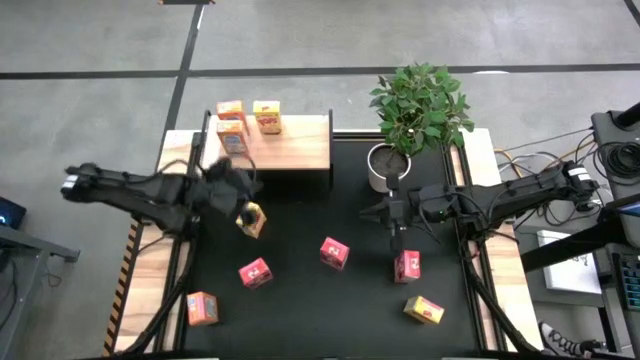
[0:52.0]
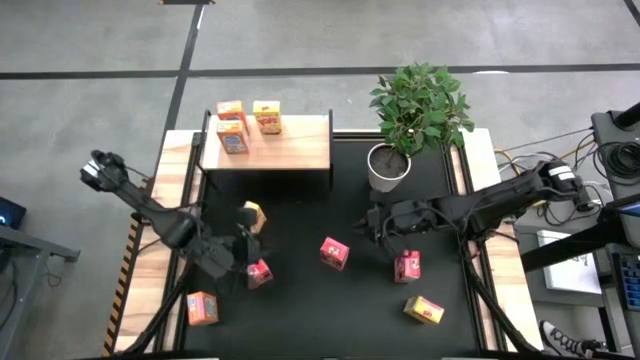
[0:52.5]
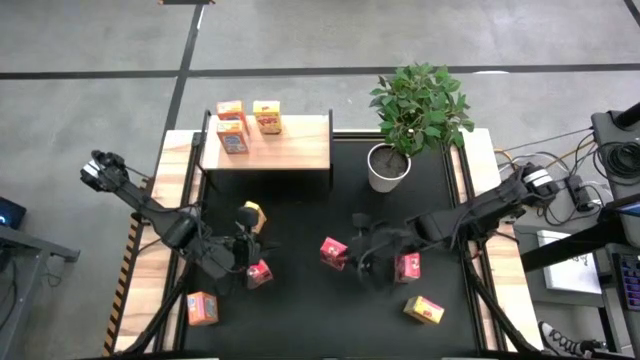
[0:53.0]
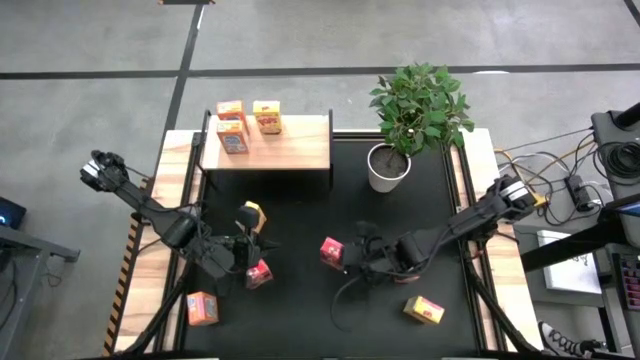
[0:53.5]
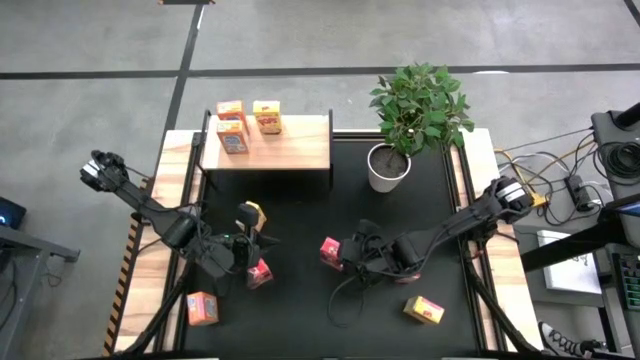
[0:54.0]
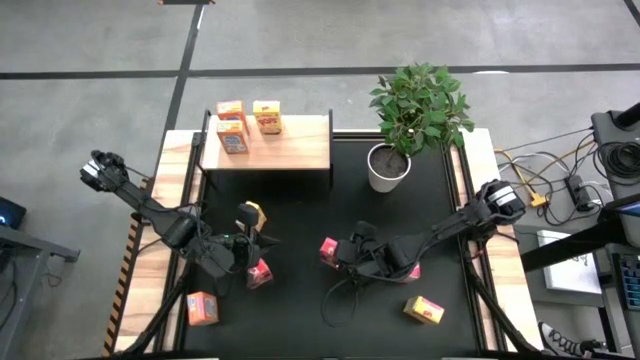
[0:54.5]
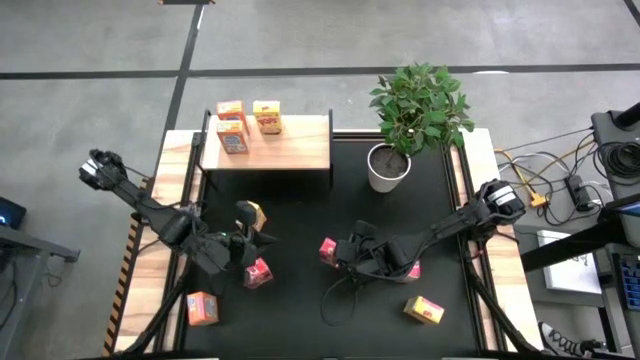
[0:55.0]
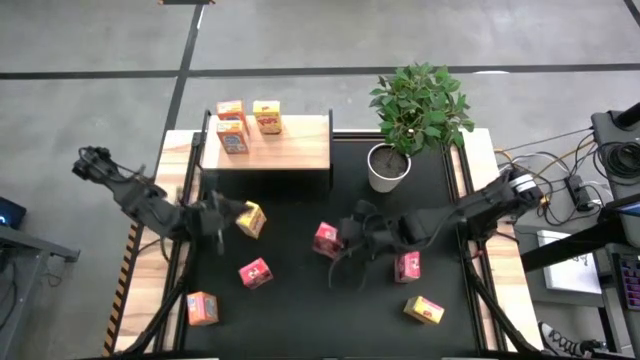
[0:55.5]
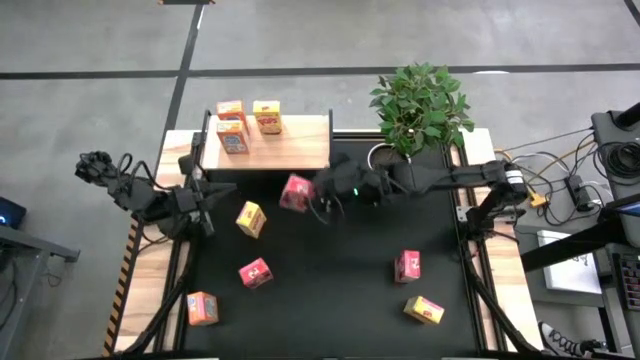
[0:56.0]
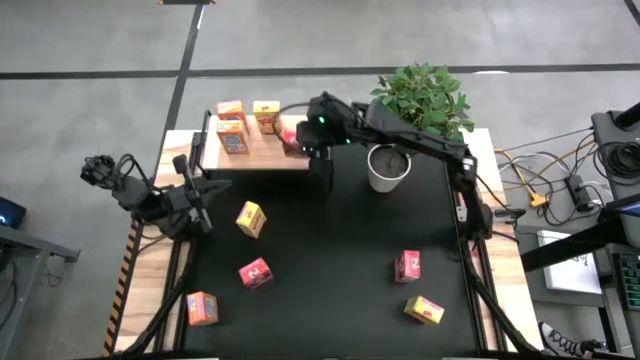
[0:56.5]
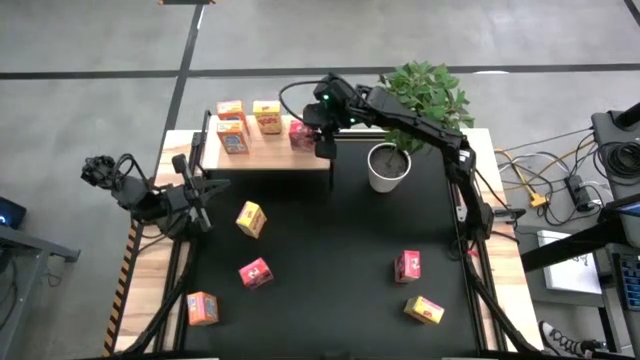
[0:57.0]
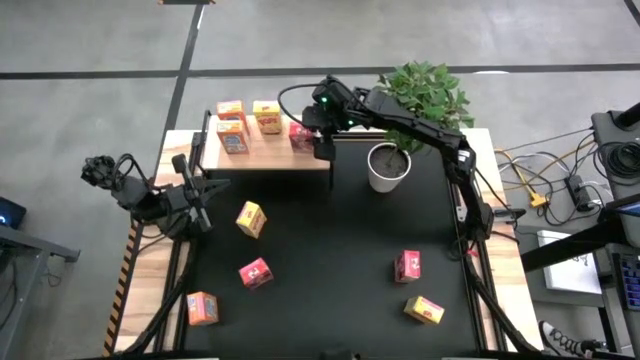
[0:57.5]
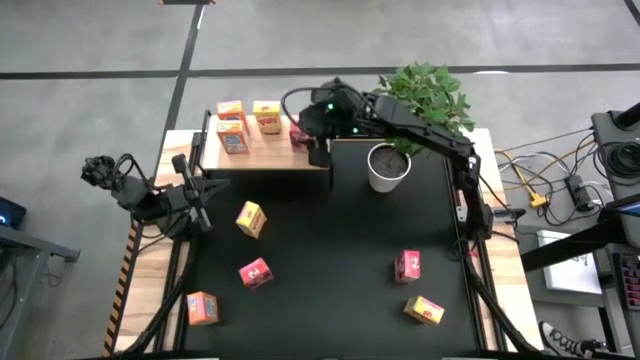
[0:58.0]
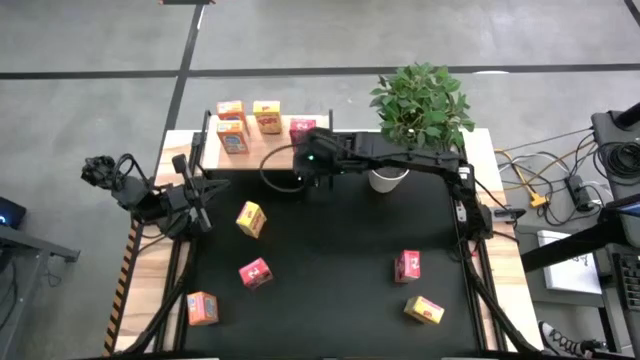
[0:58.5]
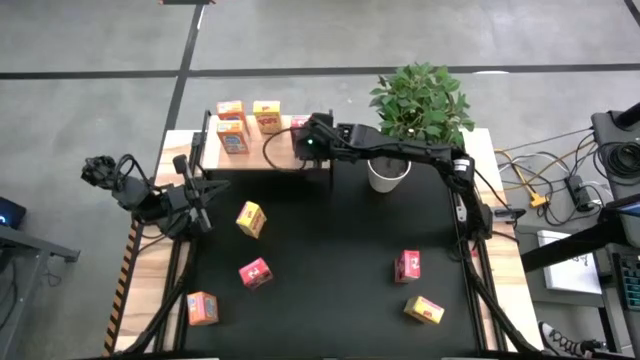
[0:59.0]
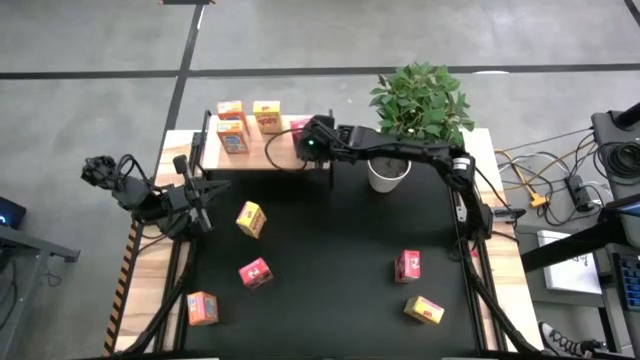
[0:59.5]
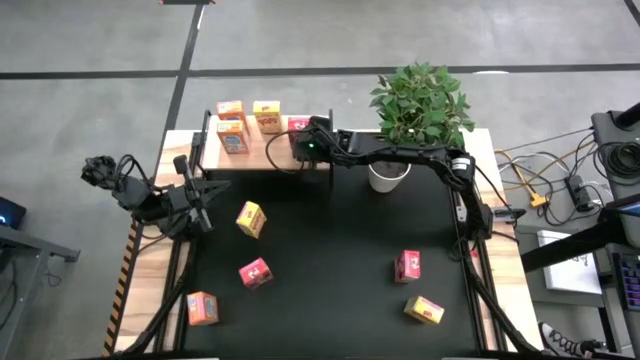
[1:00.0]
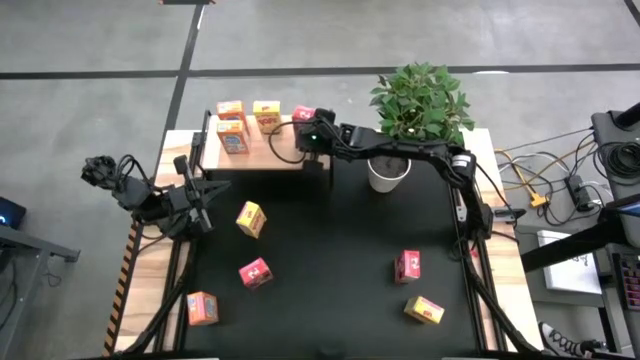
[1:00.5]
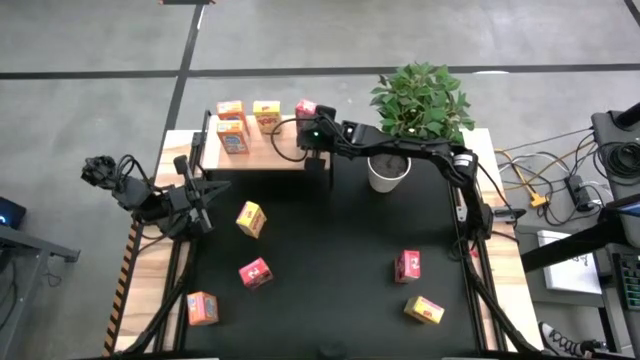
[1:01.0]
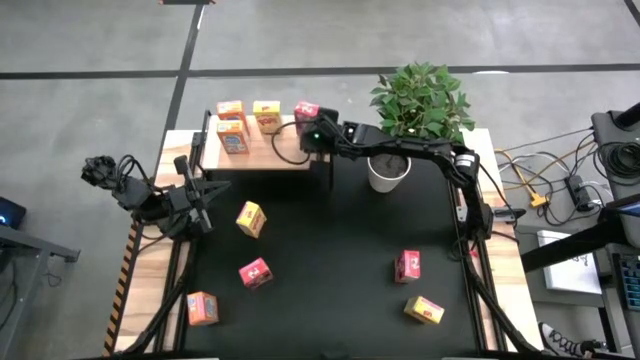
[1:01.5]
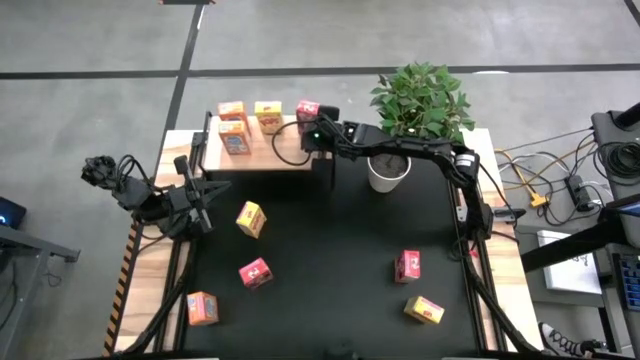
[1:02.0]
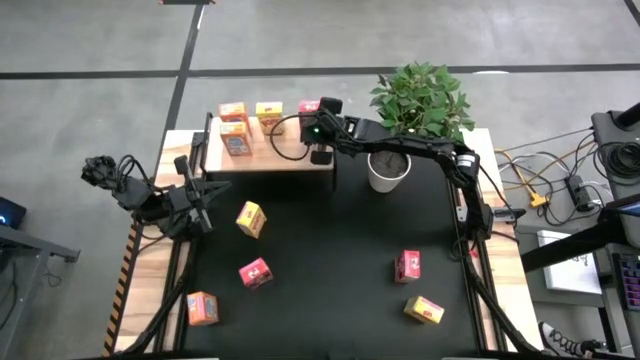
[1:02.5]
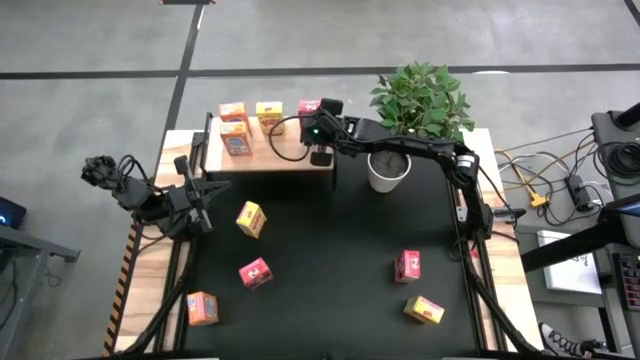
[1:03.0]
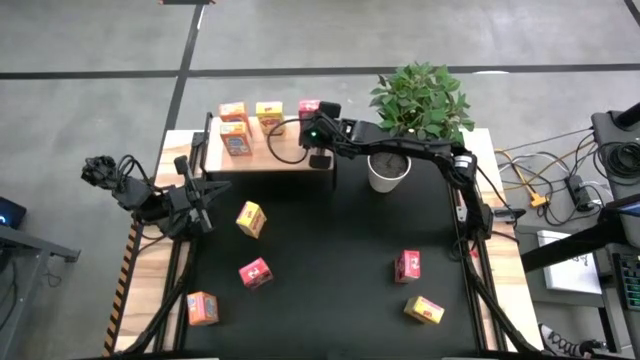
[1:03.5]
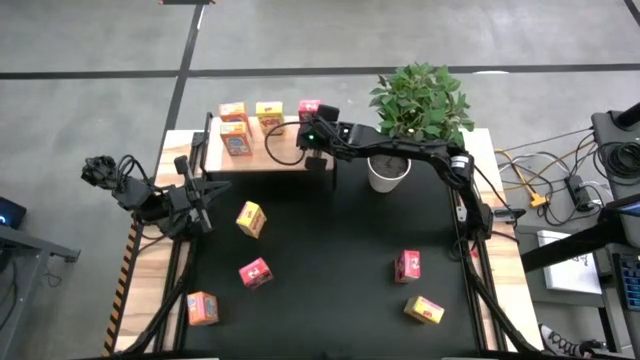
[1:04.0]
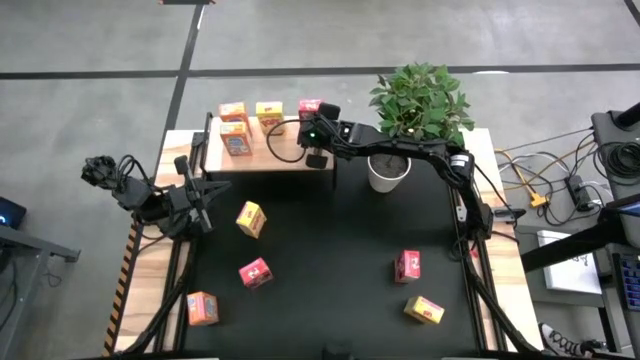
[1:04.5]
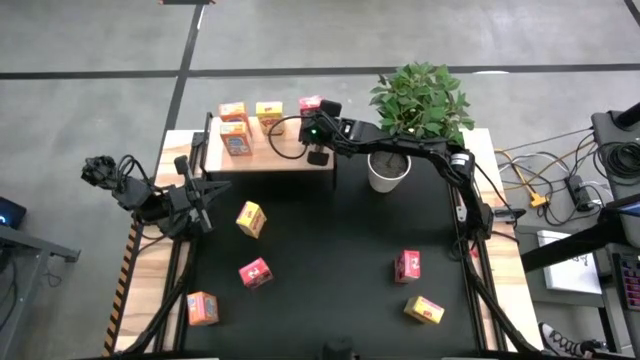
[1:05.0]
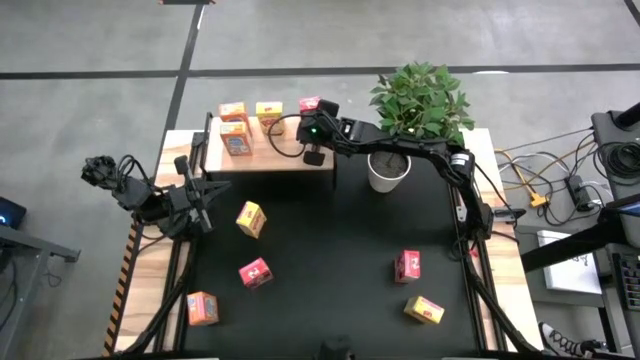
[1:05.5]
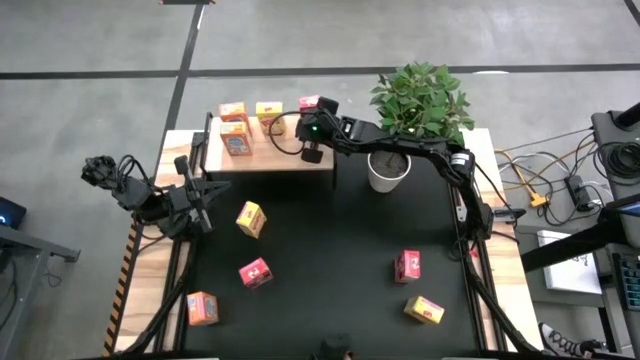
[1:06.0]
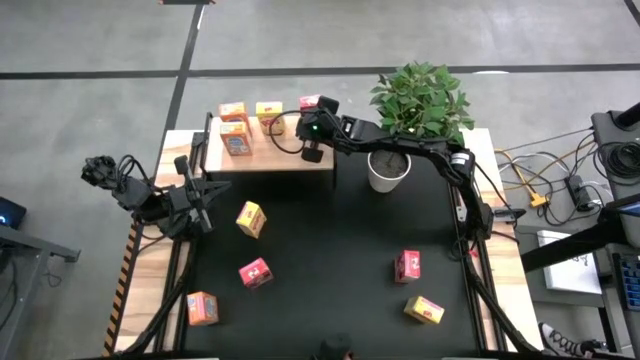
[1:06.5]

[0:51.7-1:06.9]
Task: Stack cereal on shelf
Put the center red cereal box on the shelf

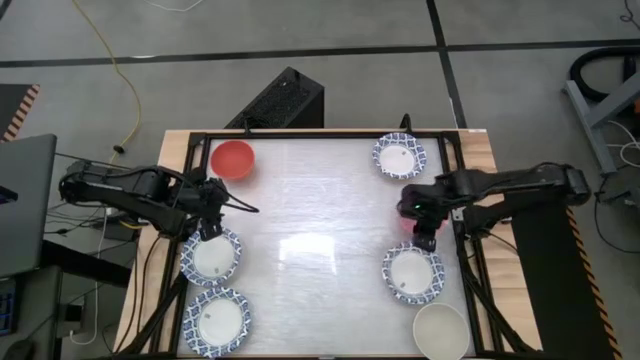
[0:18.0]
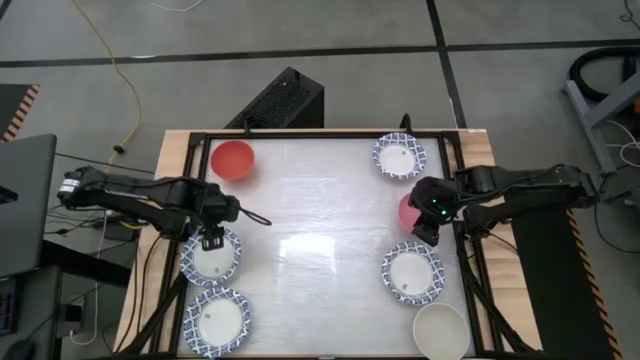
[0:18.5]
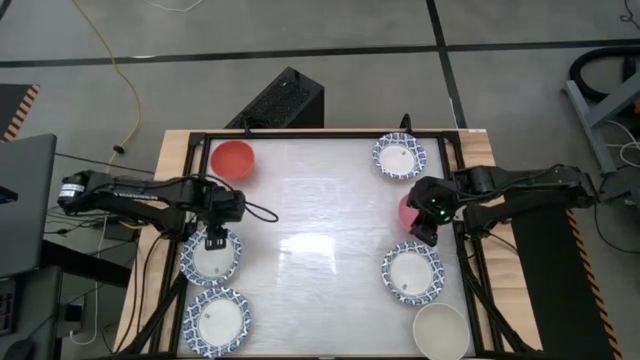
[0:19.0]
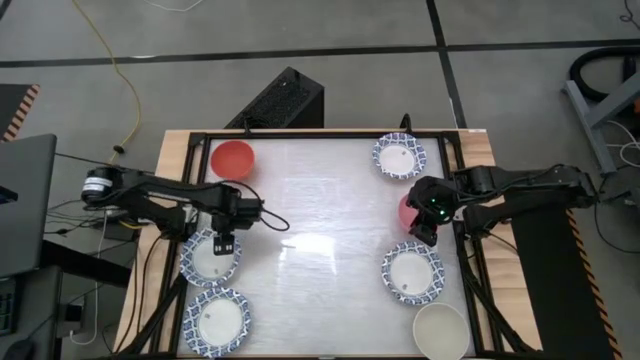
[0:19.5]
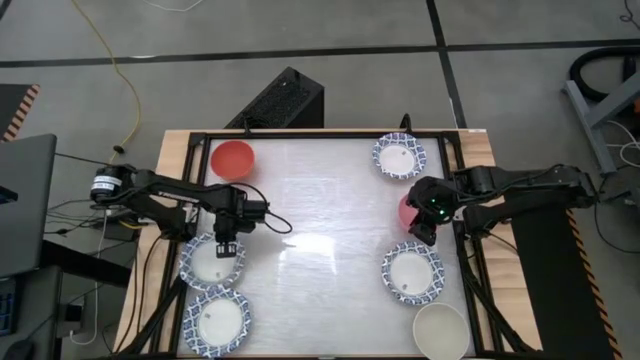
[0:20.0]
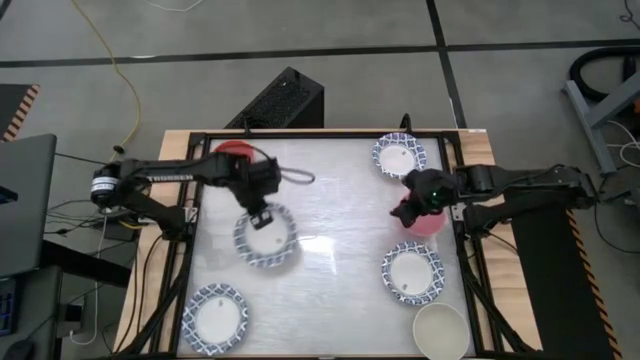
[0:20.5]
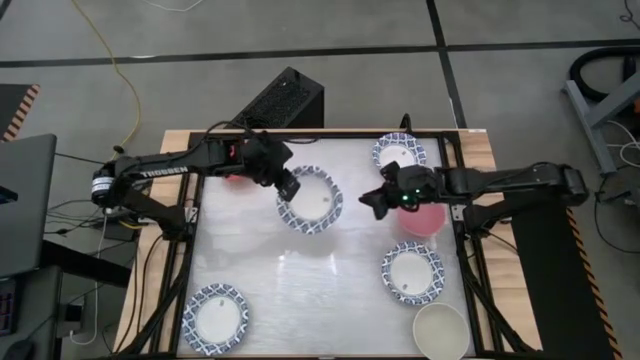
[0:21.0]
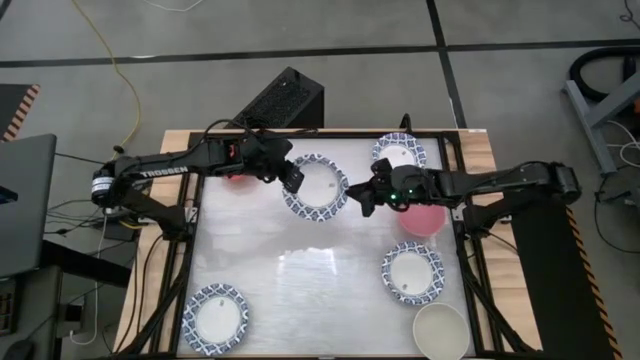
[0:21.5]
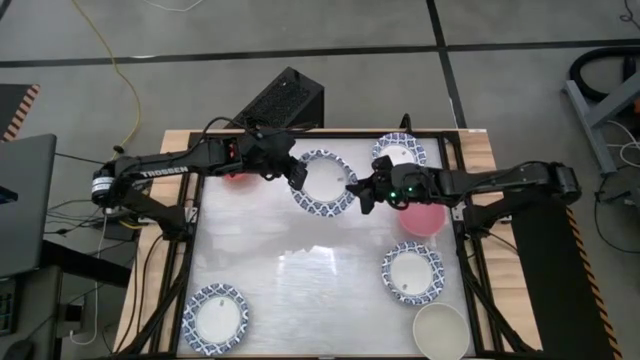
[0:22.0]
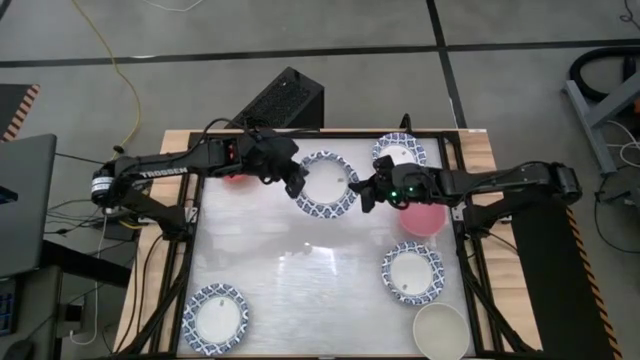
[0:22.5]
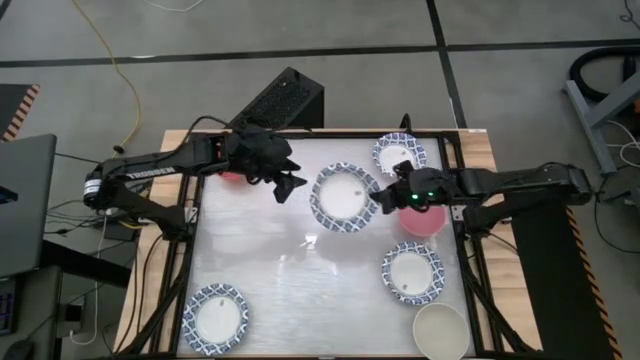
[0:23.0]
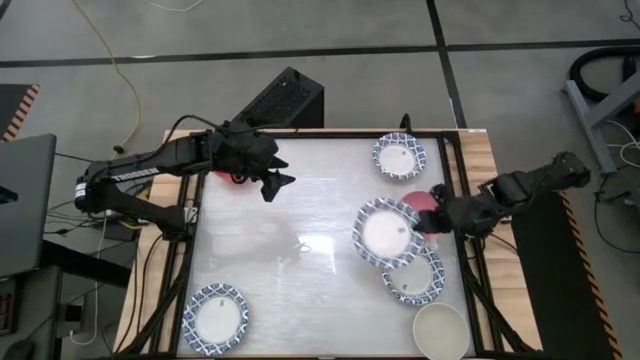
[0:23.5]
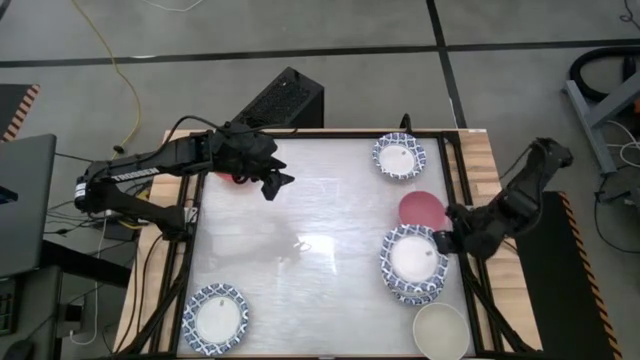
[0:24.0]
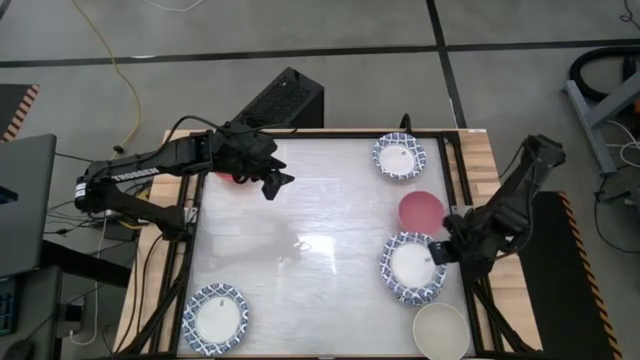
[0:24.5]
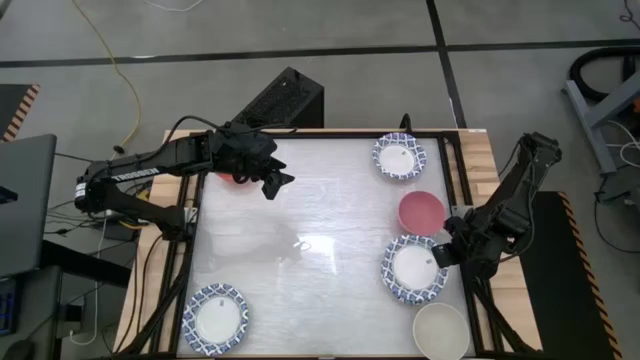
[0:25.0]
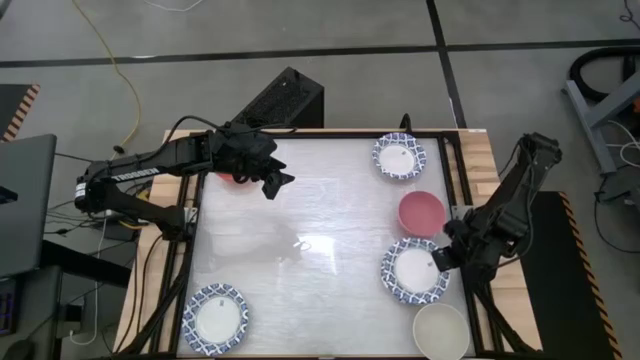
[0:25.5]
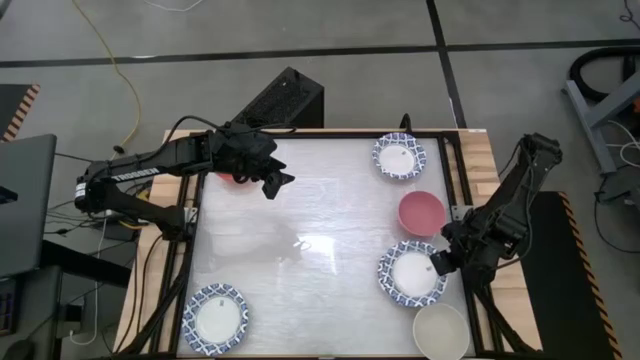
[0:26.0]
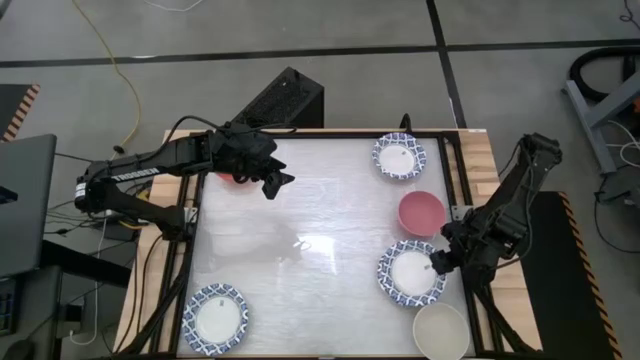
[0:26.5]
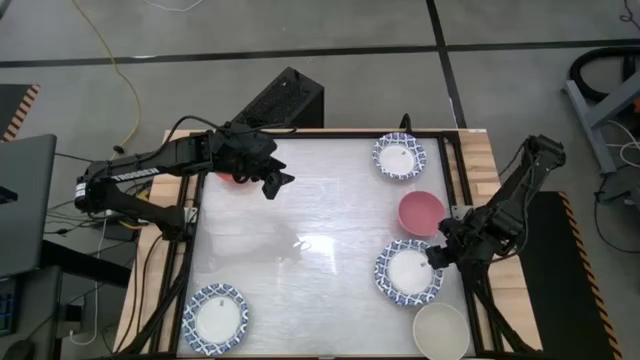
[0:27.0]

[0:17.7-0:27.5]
Task: Nest bowls inside each other by size order
Stack the top left blue bowl on top of the bottom right blue bowl
